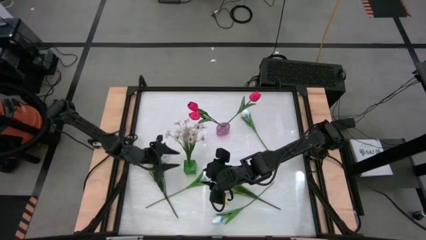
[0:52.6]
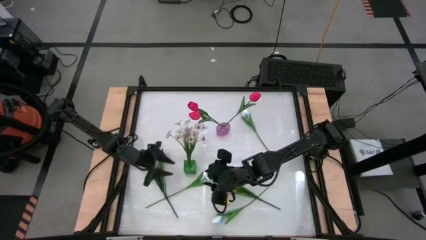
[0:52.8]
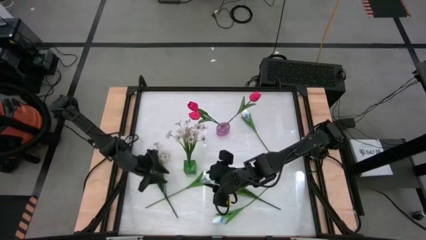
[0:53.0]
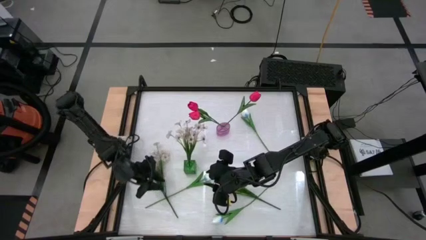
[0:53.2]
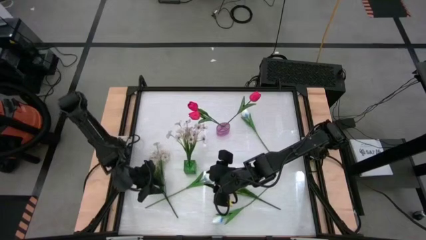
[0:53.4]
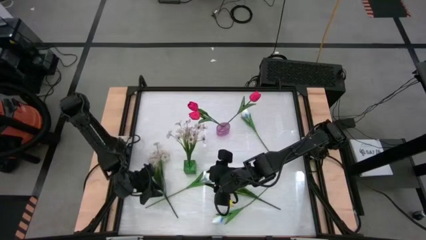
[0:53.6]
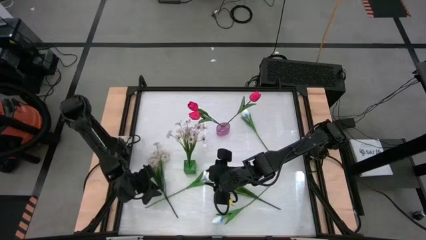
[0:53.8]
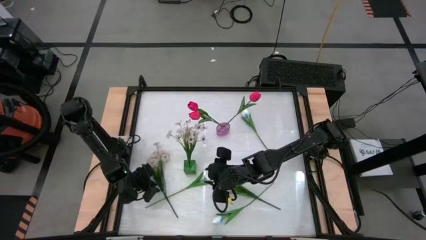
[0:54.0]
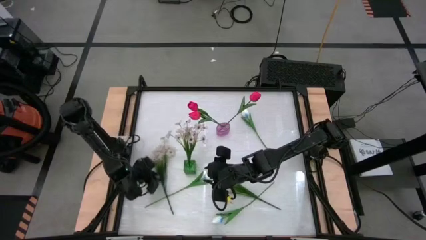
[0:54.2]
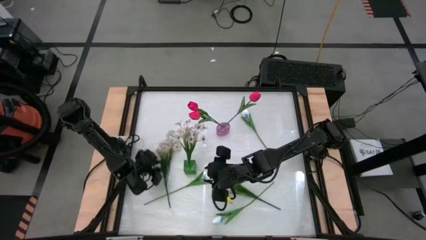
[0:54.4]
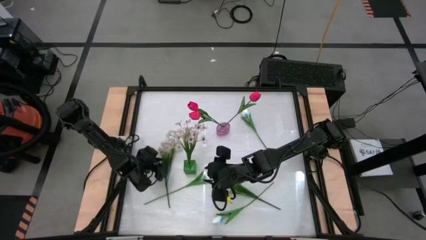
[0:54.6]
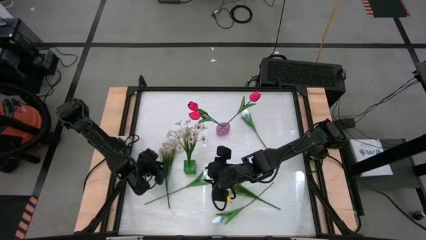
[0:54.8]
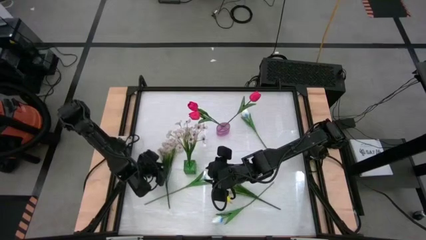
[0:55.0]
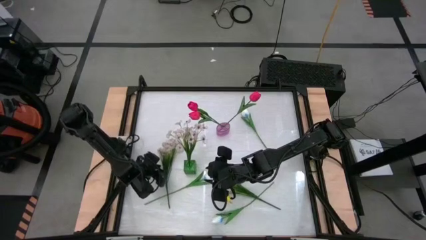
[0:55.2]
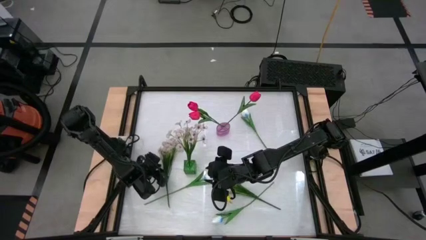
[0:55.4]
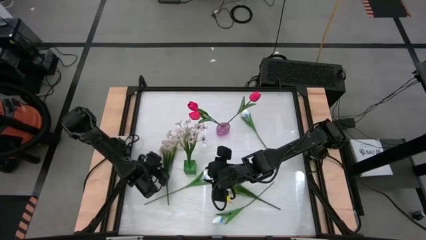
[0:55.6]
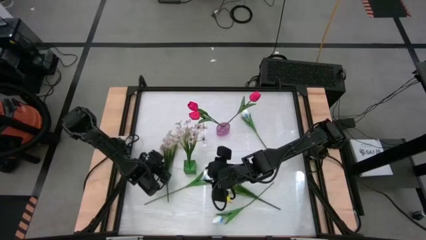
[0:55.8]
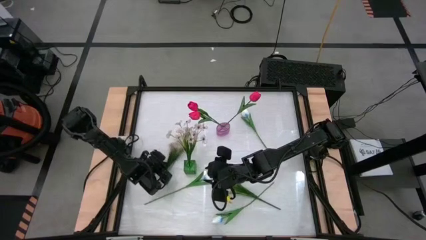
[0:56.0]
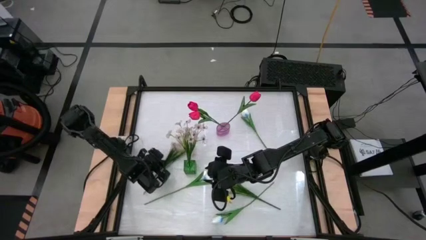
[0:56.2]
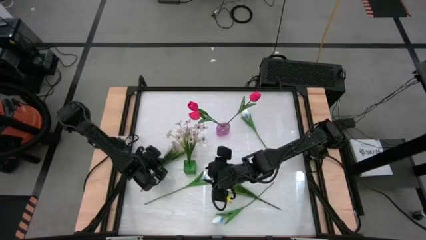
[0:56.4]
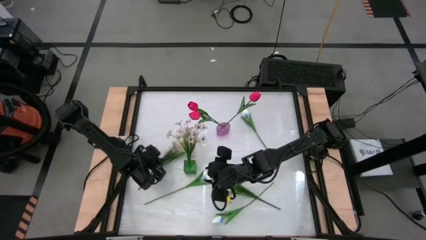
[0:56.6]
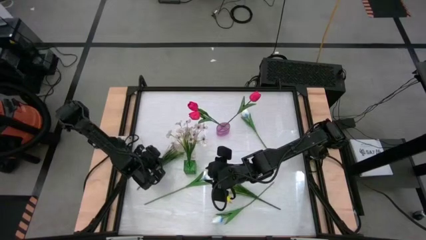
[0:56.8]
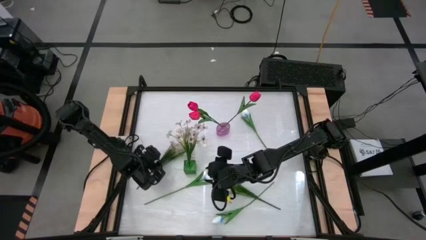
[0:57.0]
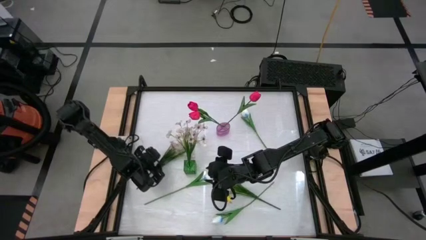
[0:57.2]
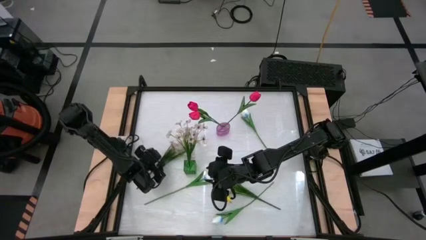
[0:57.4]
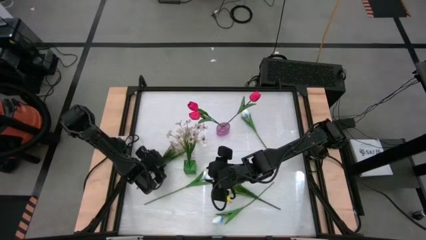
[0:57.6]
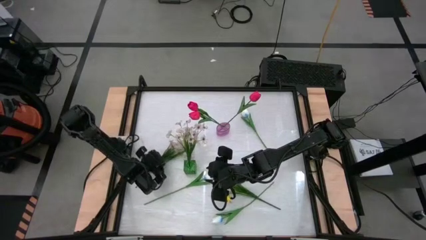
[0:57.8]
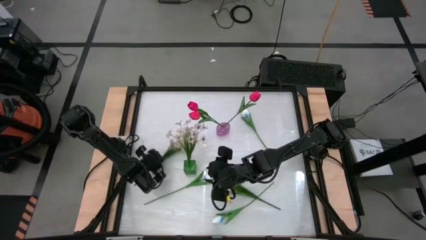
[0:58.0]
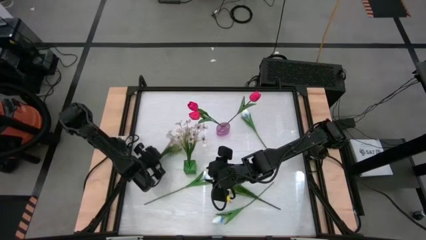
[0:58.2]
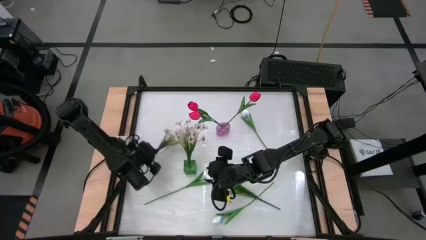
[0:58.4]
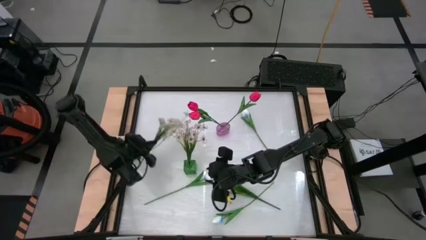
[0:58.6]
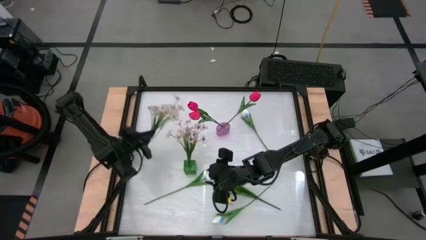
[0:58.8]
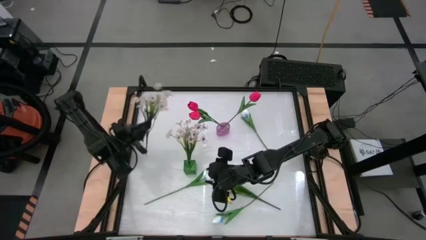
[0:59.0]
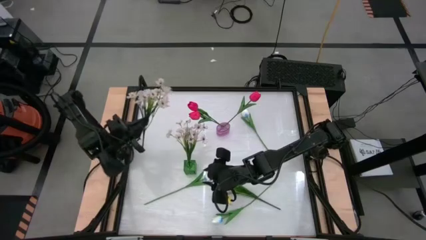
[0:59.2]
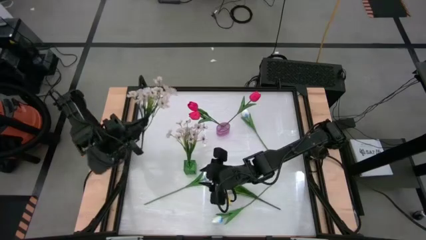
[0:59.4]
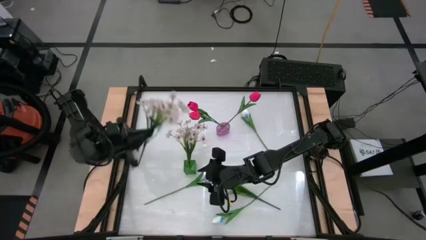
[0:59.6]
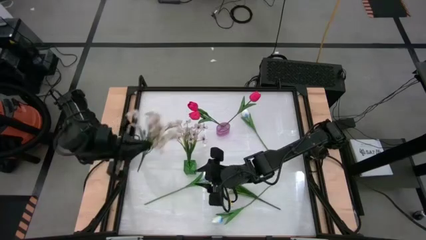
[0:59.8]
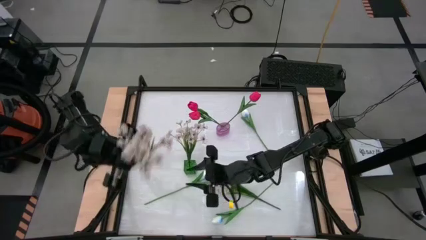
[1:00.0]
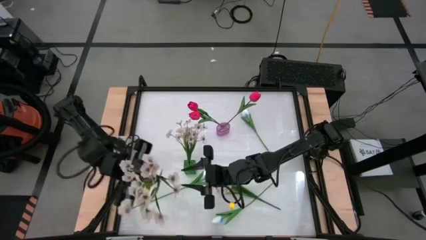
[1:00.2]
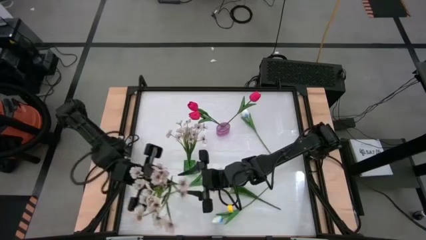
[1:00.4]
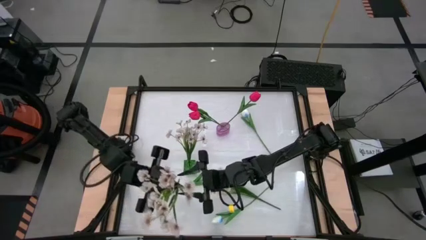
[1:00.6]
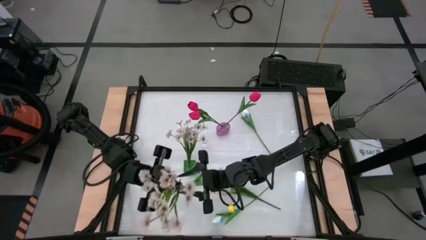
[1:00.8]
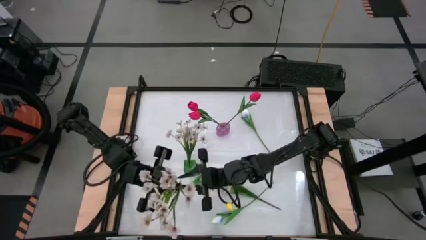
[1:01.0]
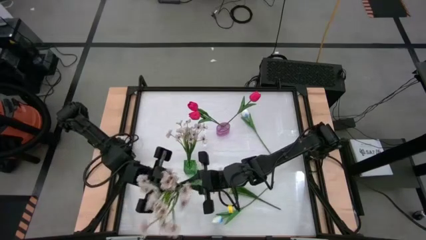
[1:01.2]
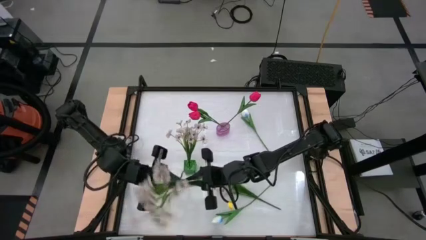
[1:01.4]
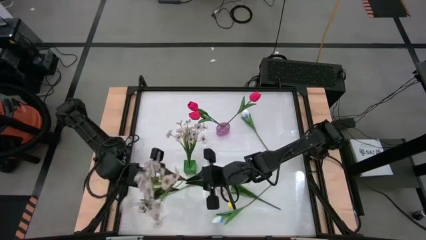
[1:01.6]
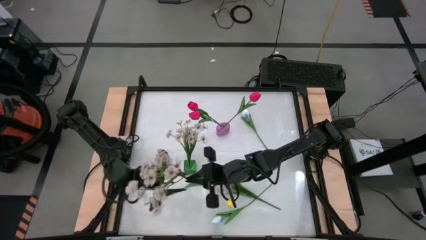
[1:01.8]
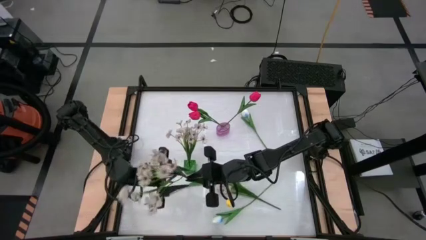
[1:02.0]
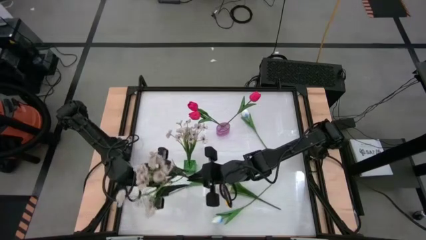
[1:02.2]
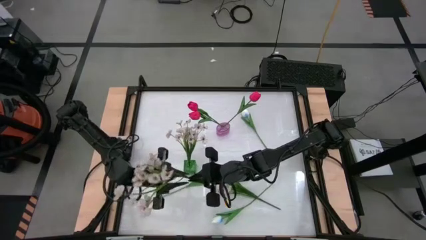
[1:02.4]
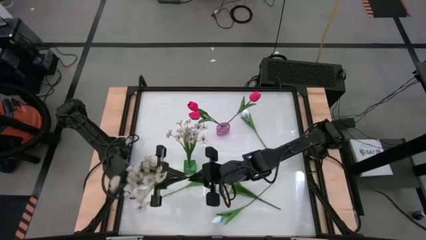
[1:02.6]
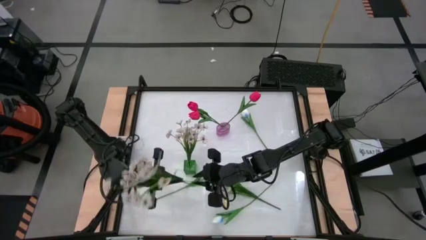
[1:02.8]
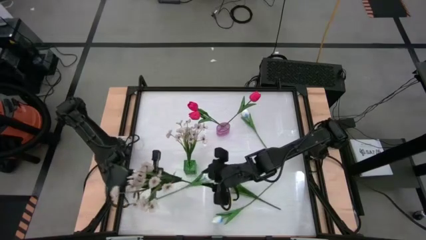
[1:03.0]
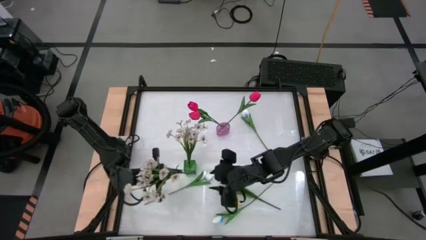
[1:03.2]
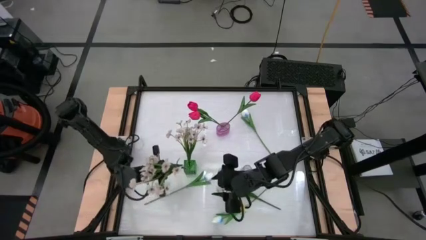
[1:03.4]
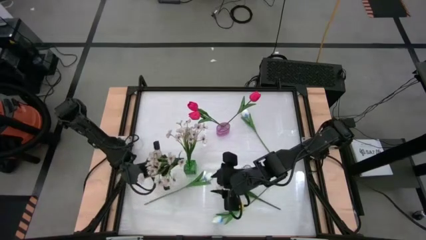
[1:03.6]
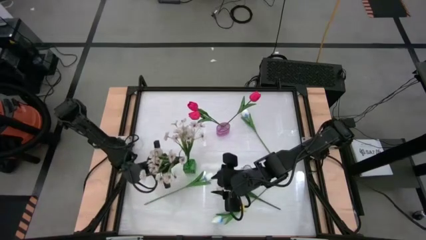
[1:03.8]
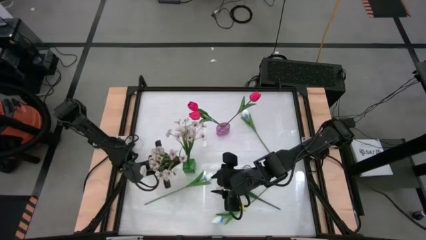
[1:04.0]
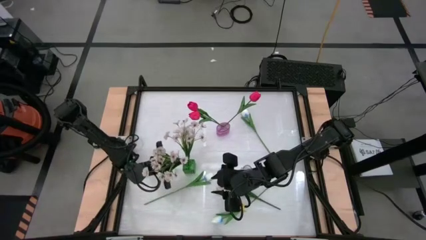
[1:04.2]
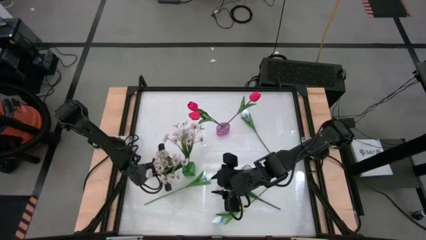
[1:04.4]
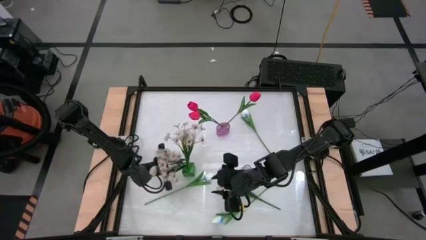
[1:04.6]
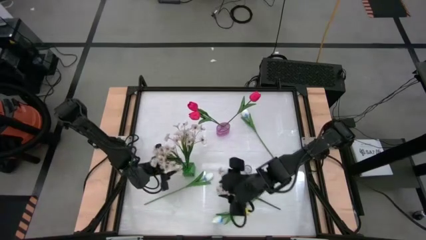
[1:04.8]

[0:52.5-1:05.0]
Task: Sort flowers into vase by color
Put the left white flowers into the green vase

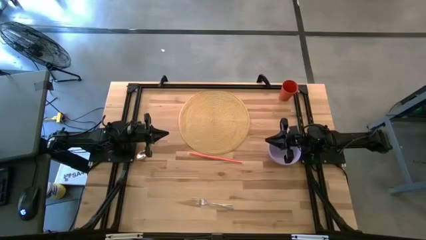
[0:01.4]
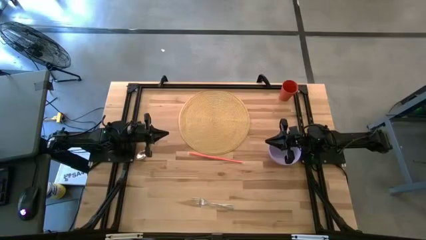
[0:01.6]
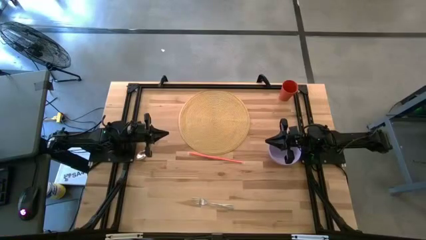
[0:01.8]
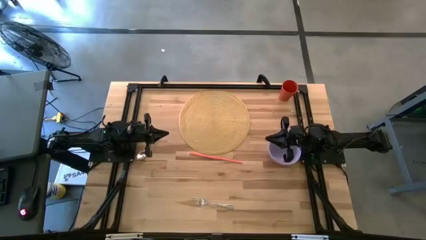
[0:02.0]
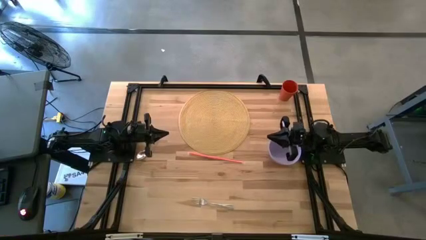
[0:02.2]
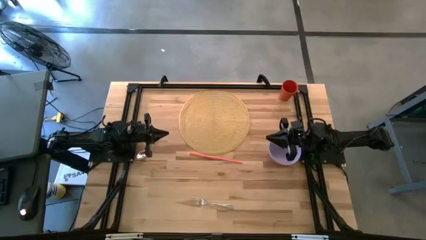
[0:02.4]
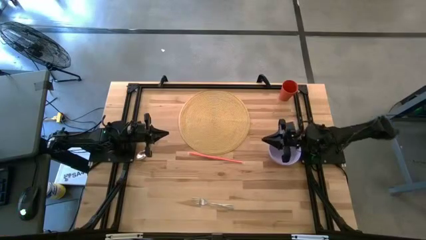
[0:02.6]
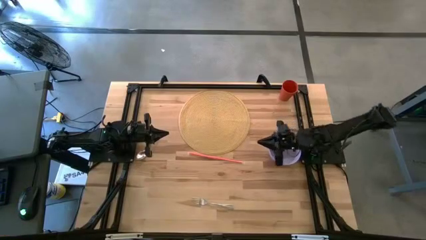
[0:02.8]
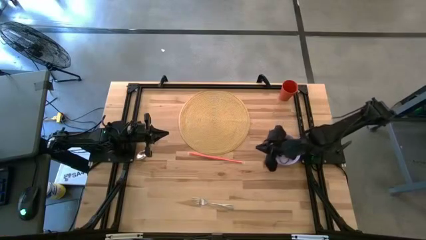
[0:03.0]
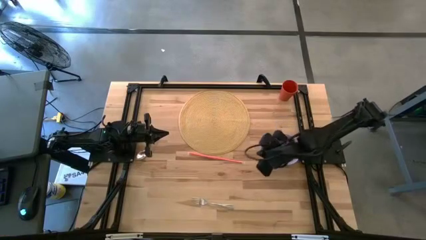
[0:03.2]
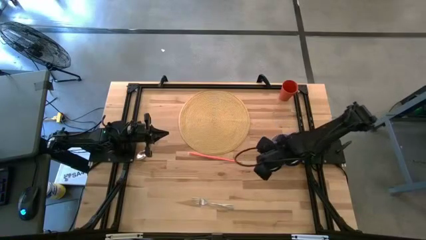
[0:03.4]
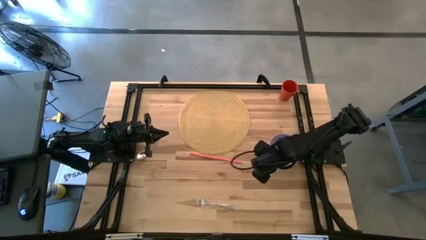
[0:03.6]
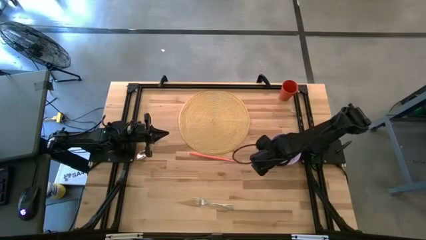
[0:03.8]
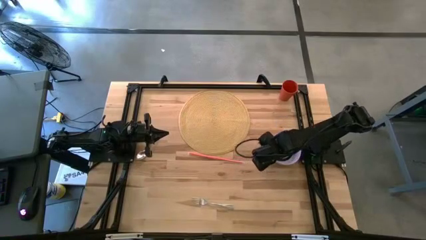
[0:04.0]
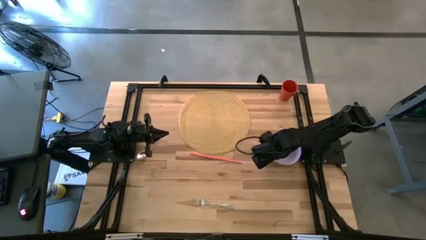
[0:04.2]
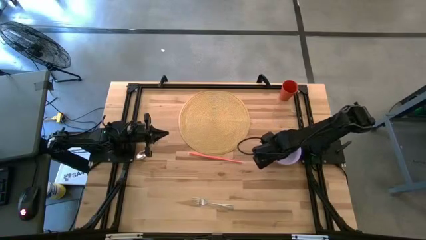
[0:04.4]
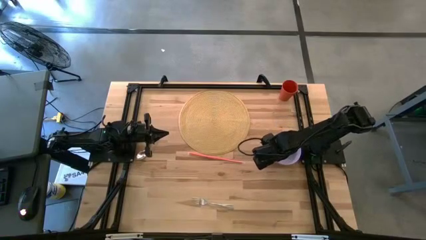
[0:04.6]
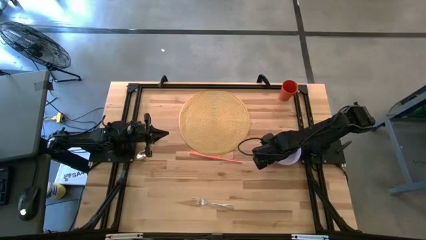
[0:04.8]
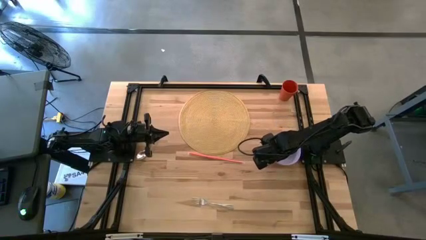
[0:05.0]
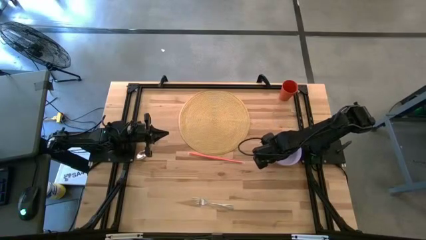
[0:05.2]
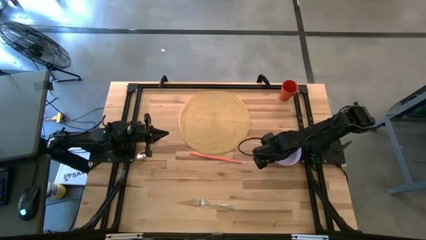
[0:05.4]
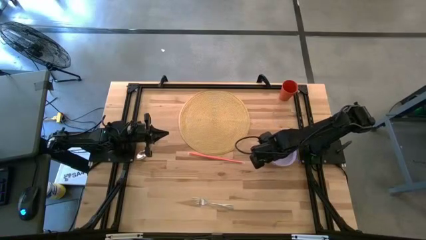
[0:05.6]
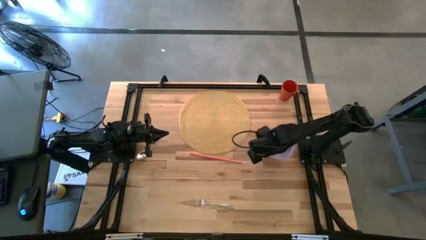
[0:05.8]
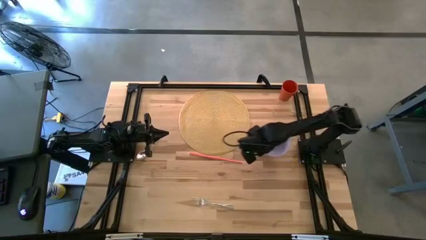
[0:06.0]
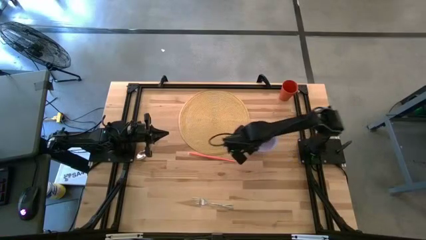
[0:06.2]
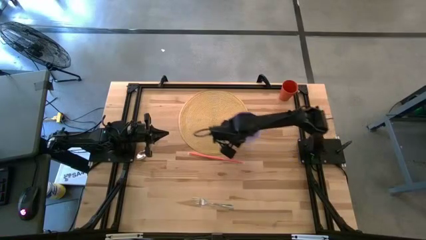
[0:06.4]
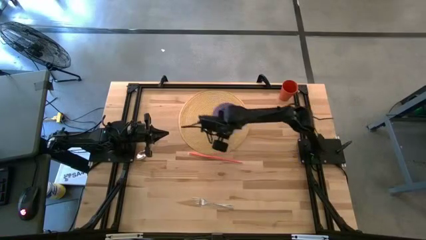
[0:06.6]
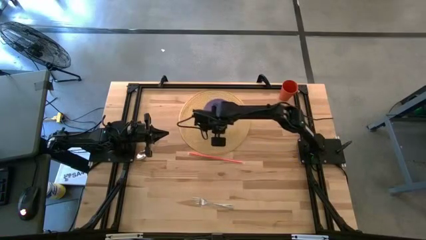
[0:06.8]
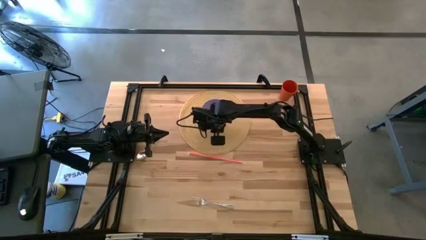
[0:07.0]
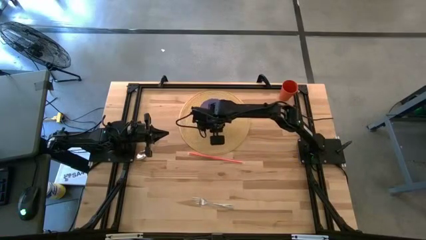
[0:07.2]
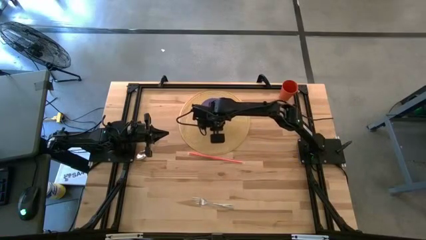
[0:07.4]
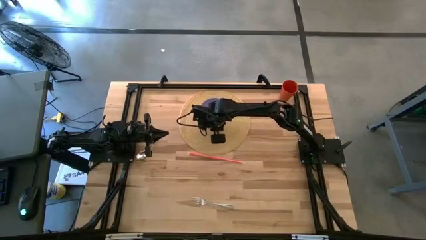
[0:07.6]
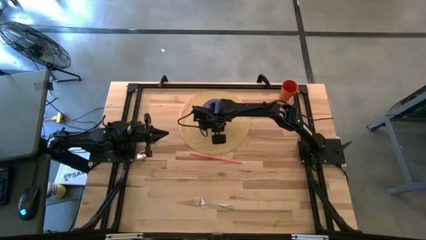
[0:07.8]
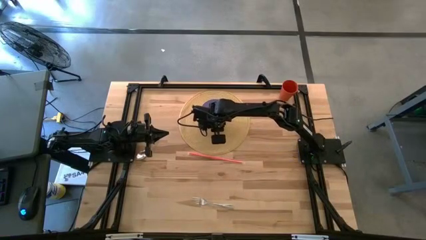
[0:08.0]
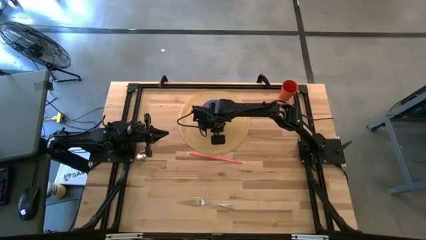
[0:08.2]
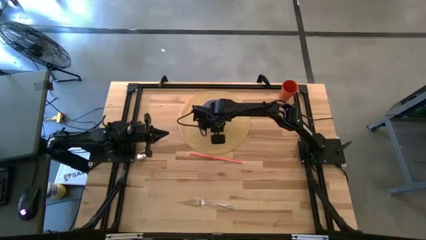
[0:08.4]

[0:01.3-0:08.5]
Task: Pick & Place Utensil
Put the purple bowl on the brown mat
